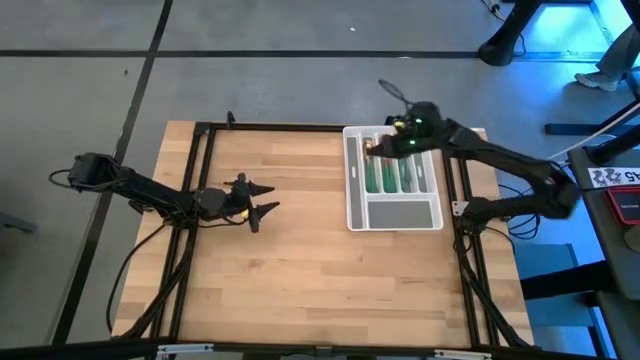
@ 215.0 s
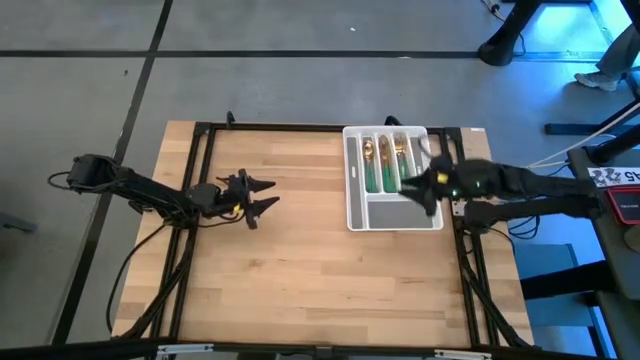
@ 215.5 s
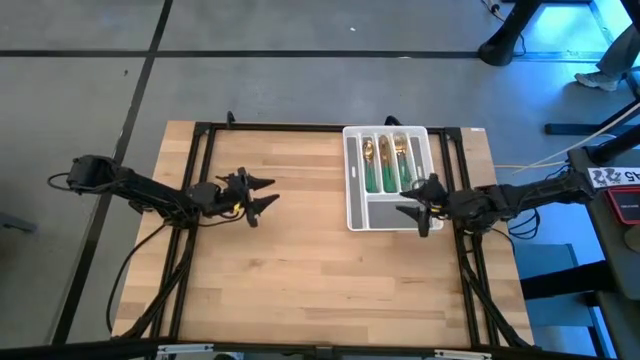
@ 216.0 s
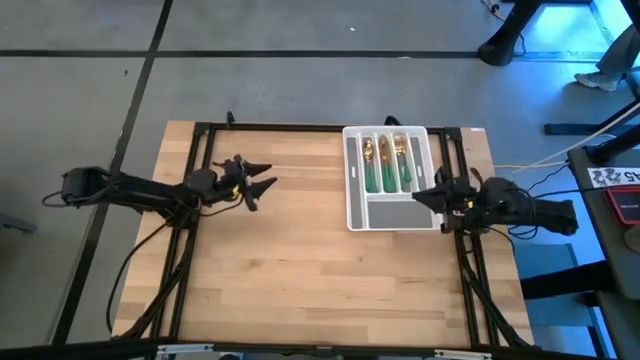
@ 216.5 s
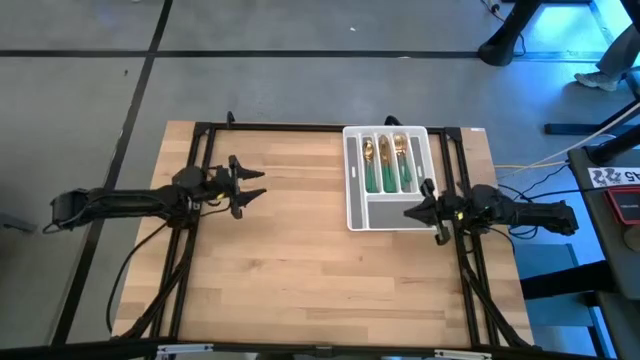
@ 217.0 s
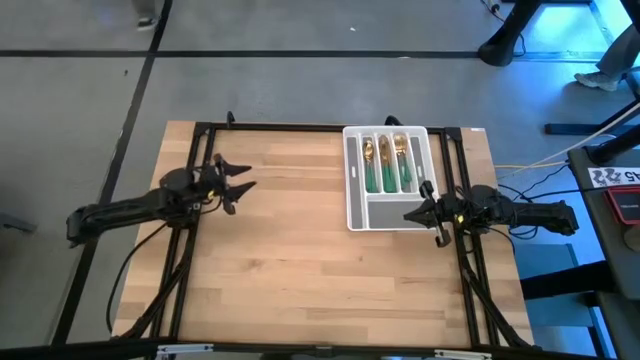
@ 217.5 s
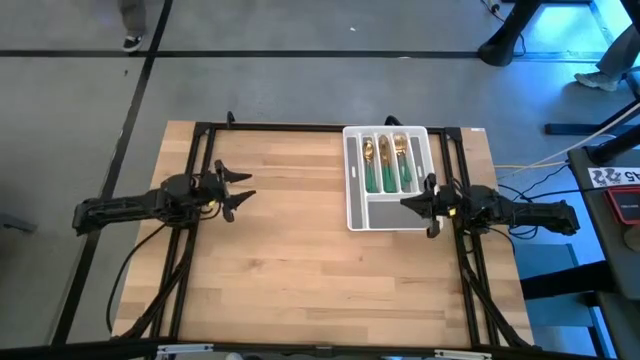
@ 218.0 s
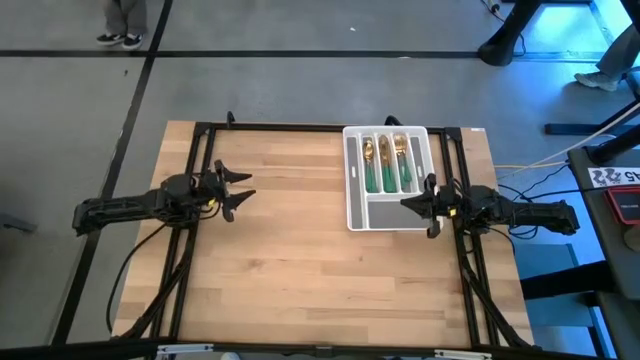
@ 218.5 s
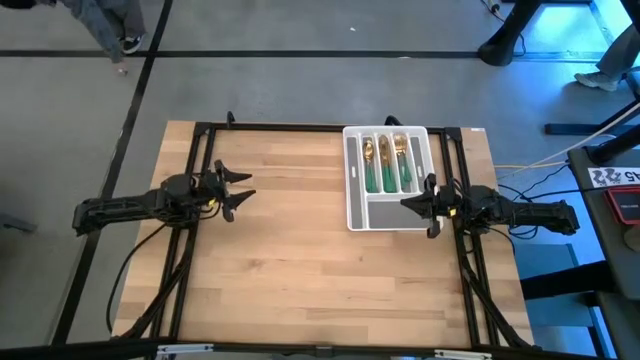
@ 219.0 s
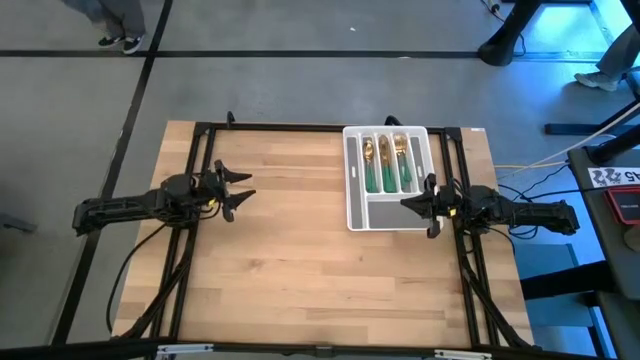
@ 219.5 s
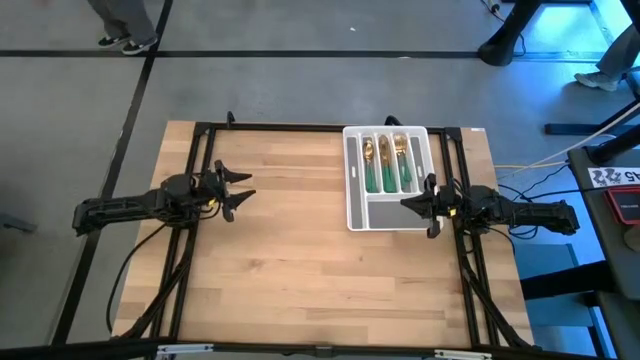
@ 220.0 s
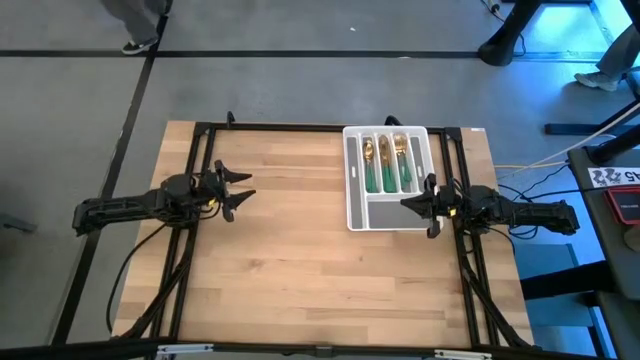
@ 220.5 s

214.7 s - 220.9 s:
Task: Sort silverware
Return to Home Position

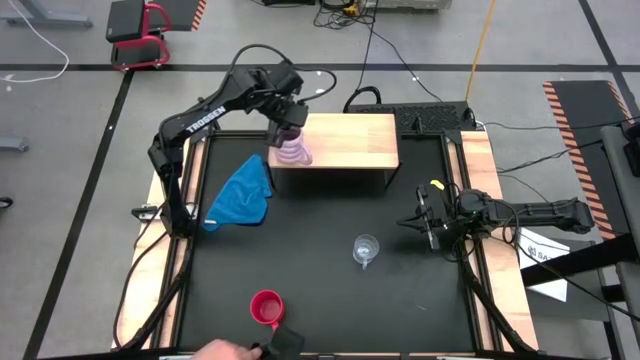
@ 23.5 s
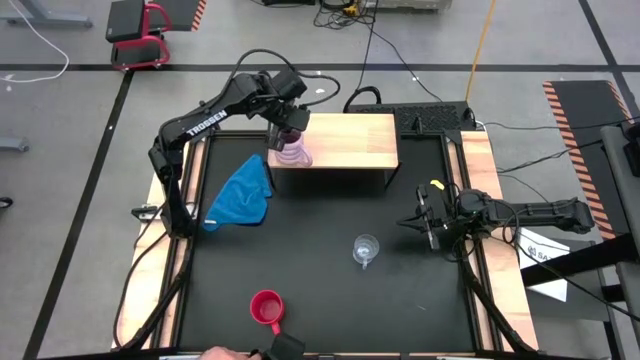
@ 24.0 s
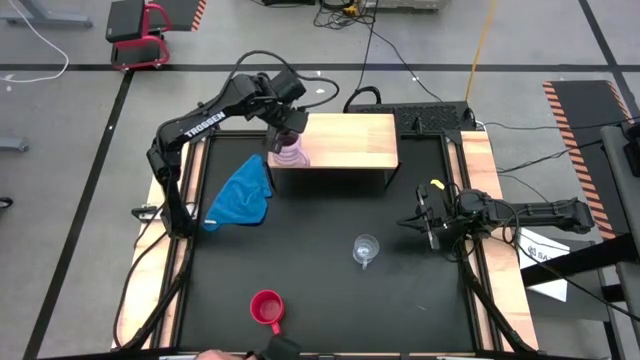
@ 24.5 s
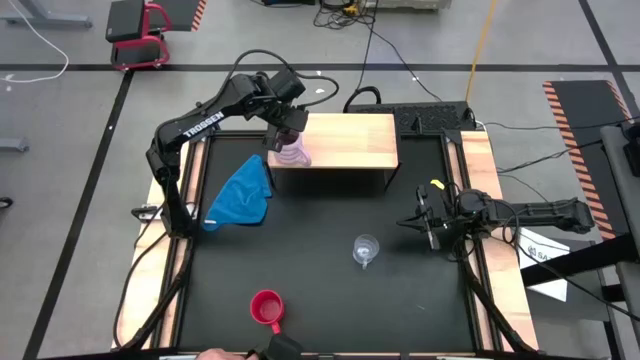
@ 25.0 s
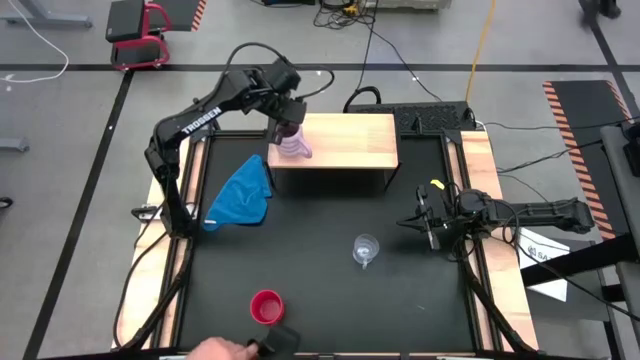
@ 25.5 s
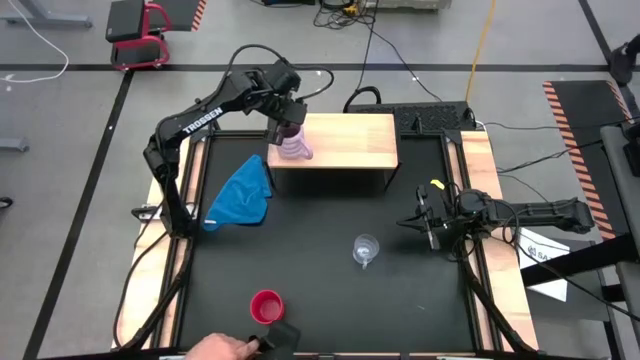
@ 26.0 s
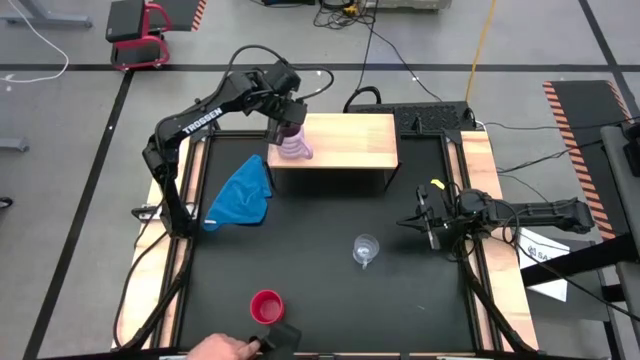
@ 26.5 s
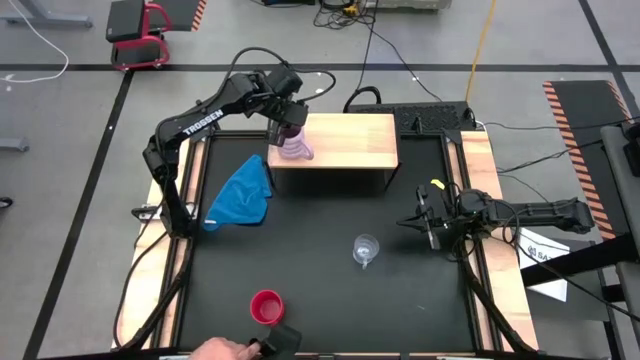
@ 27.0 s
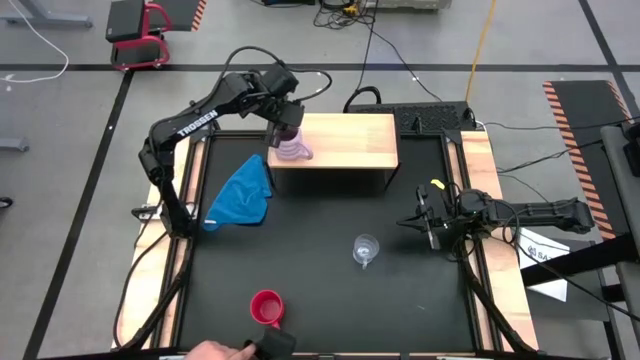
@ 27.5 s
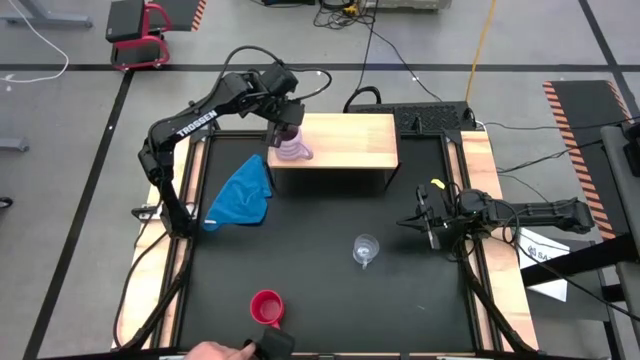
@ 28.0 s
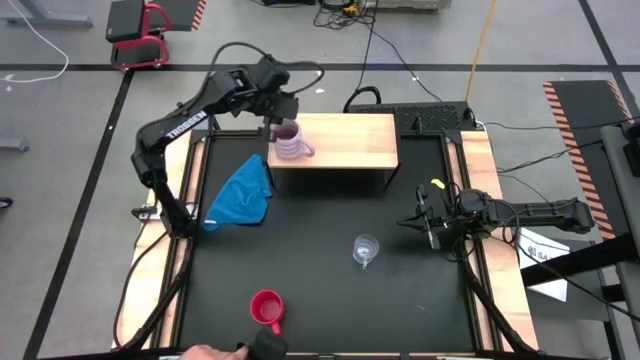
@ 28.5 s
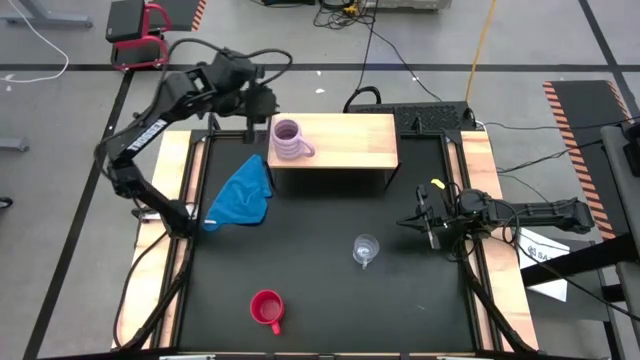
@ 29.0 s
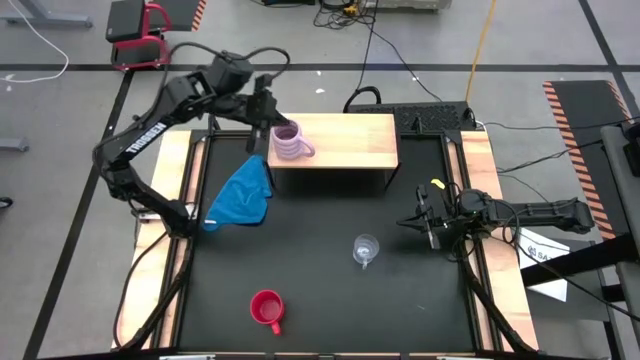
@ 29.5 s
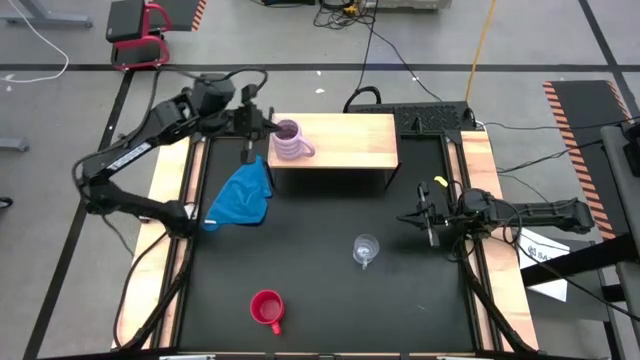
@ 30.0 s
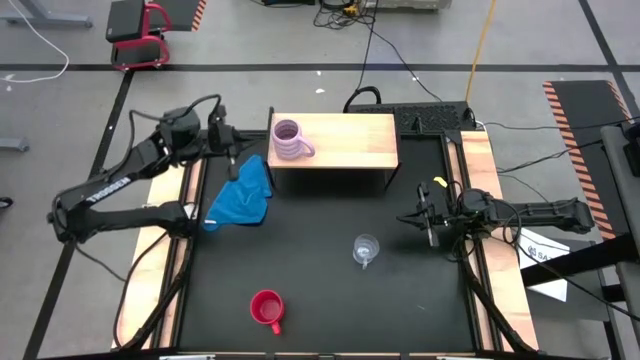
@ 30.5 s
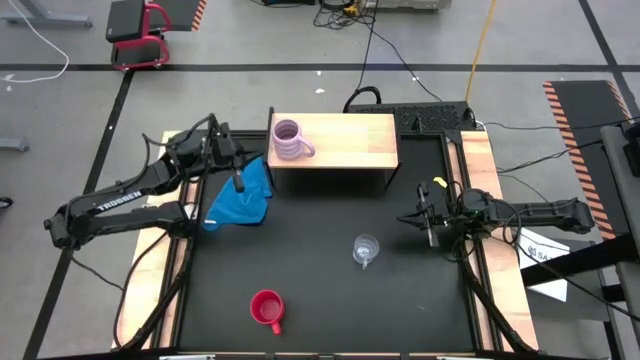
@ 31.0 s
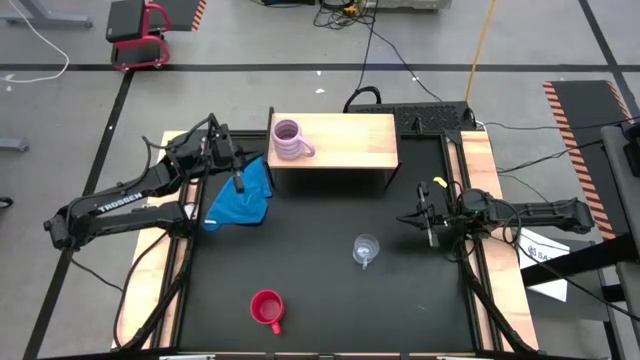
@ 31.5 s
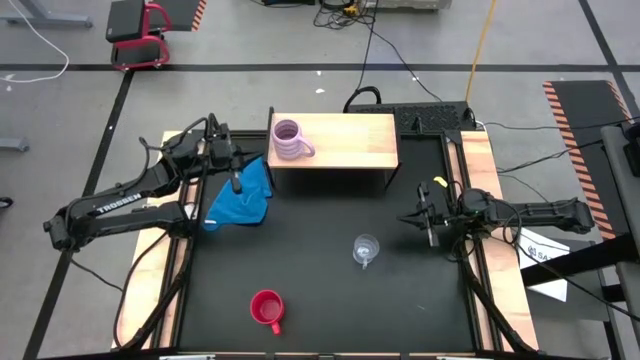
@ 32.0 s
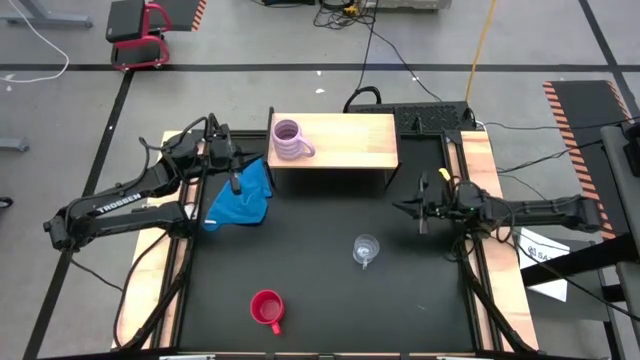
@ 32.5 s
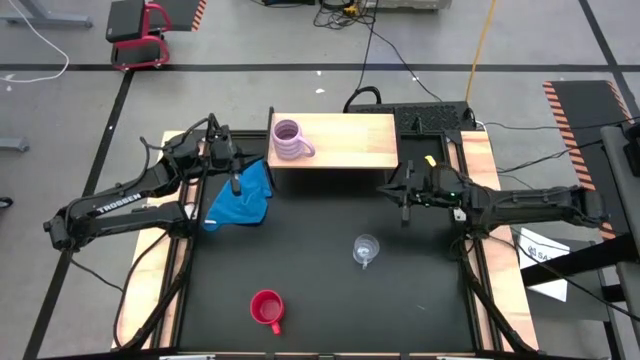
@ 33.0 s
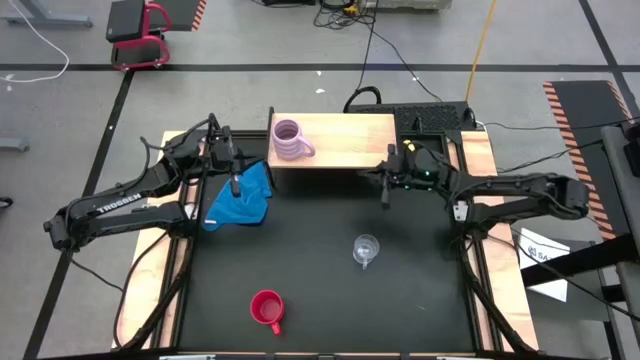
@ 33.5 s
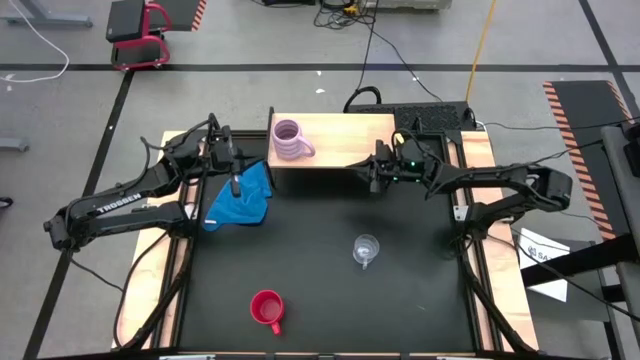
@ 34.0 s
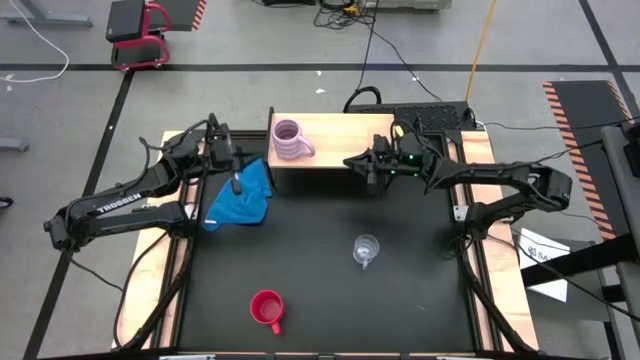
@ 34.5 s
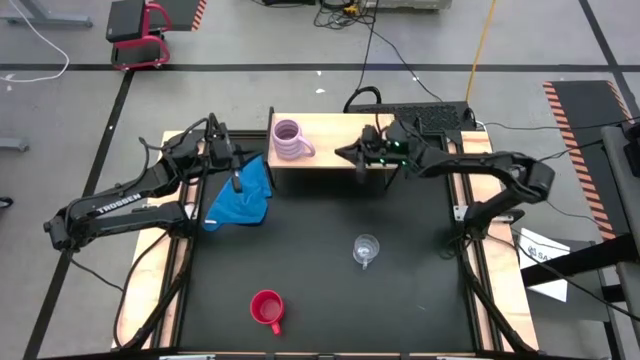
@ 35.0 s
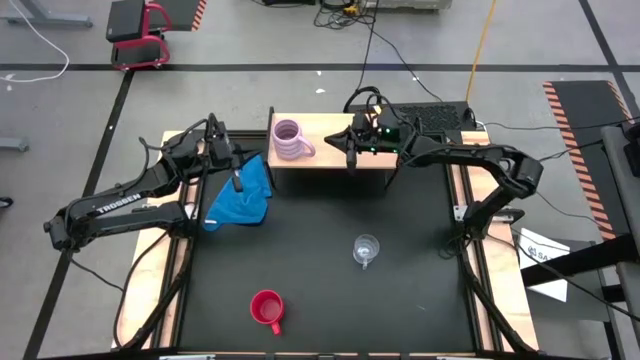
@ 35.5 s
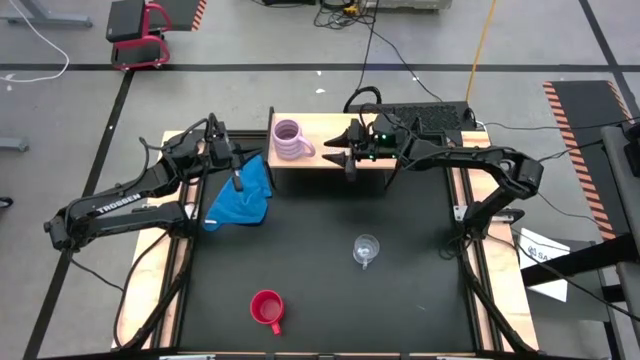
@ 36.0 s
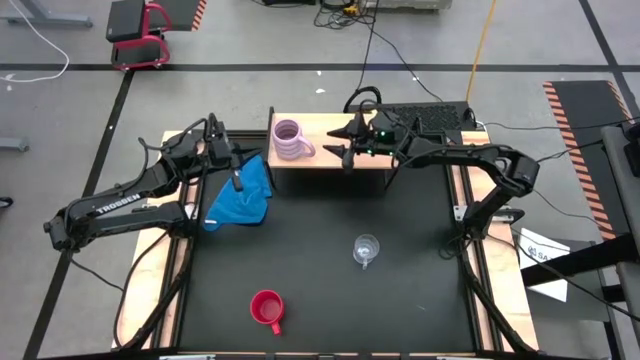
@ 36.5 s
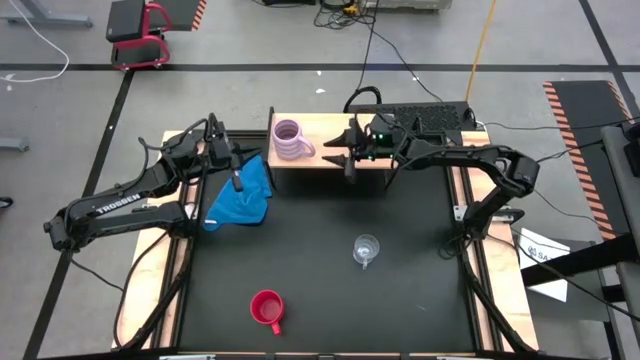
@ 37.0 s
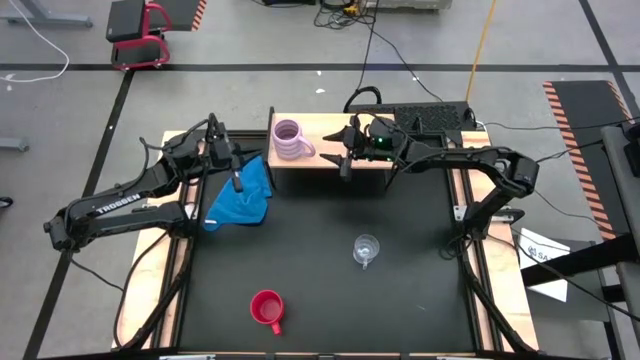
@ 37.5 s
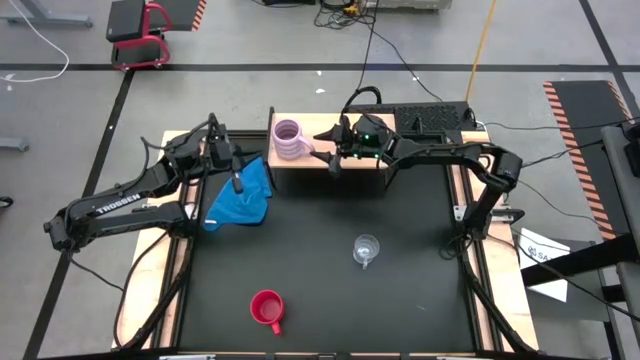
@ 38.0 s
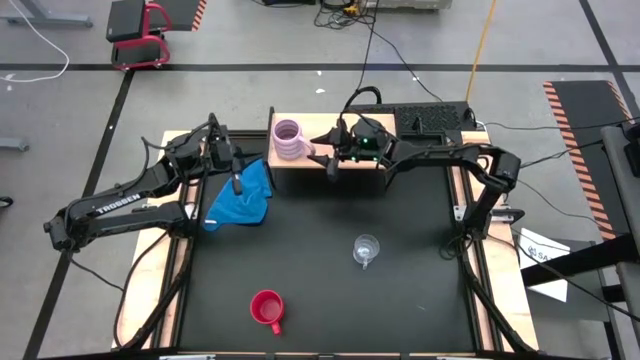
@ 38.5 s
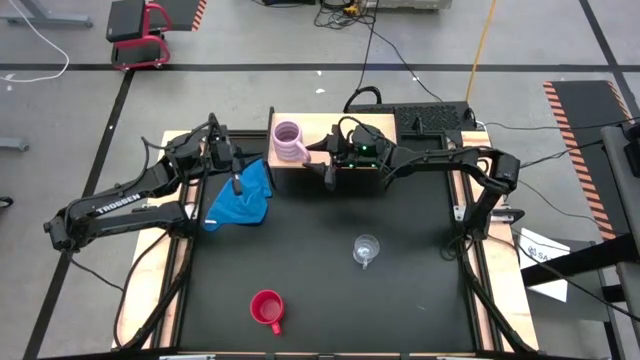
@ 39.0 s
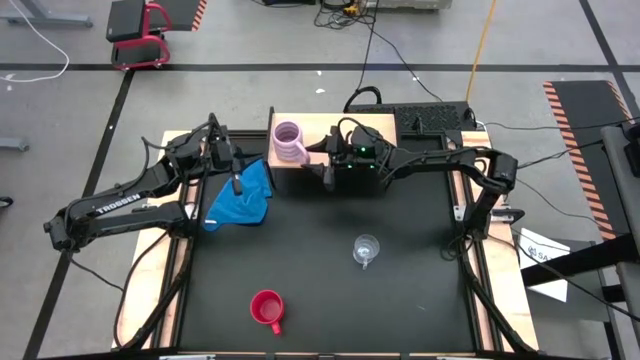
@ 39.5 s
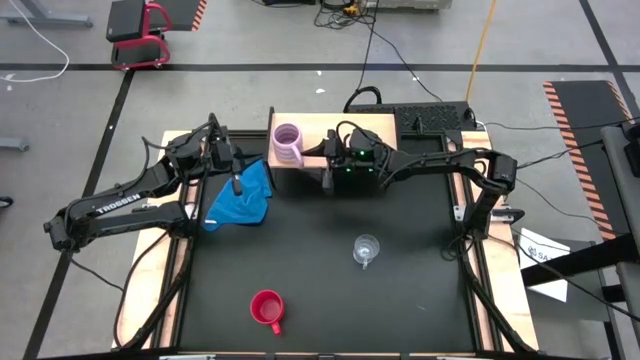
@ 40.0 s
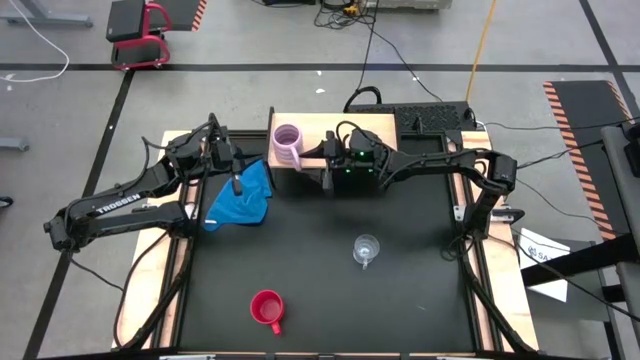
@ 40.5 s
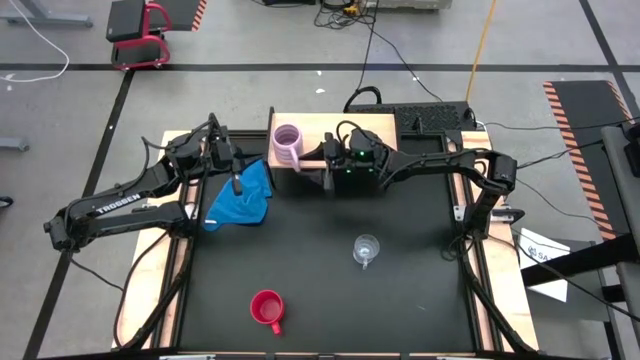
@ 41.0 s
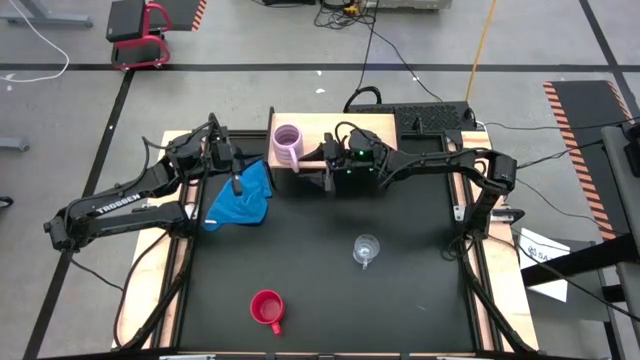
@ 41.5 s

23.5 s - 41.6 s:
Task: Stack small to large cups/mugs on shelf
Put the purple mug on the shelf
